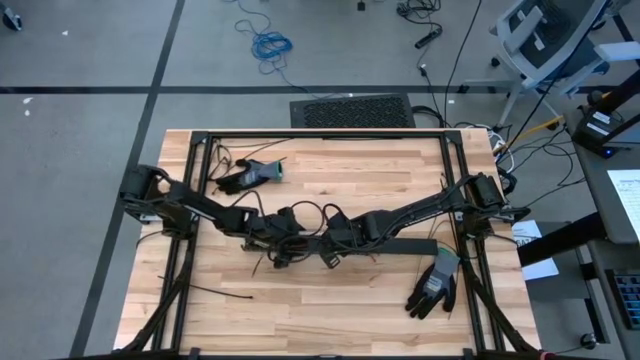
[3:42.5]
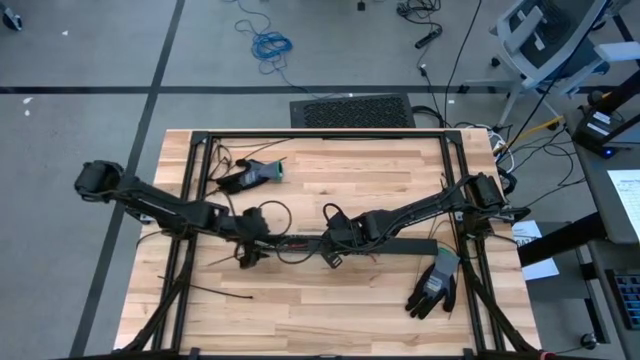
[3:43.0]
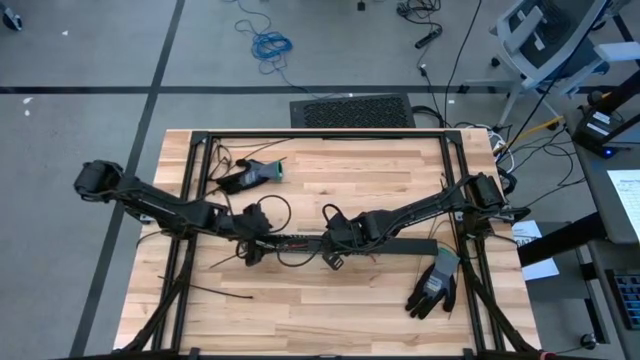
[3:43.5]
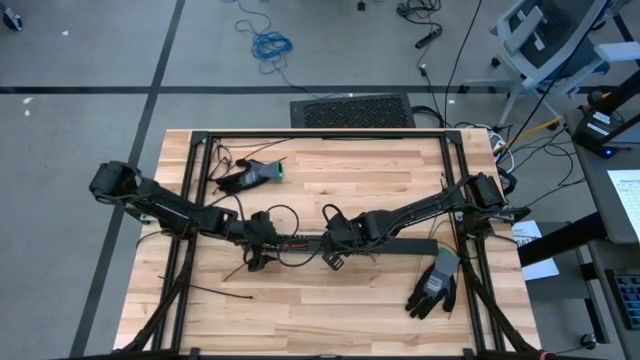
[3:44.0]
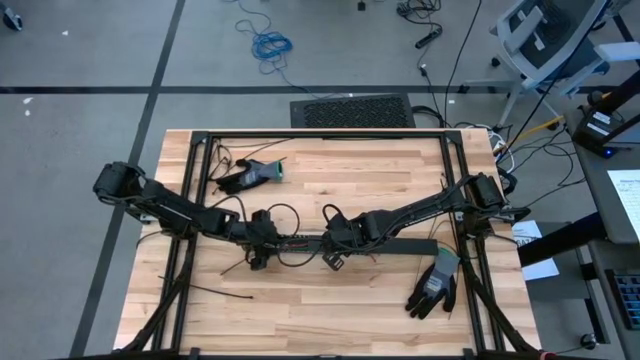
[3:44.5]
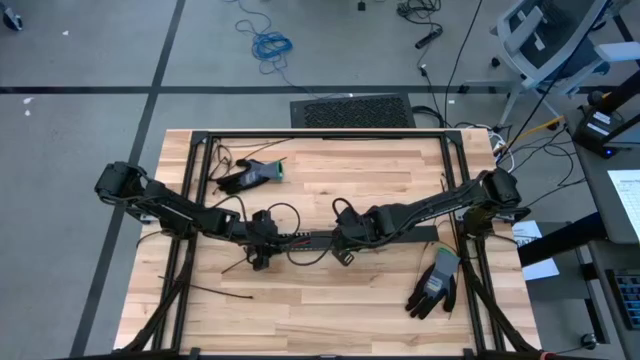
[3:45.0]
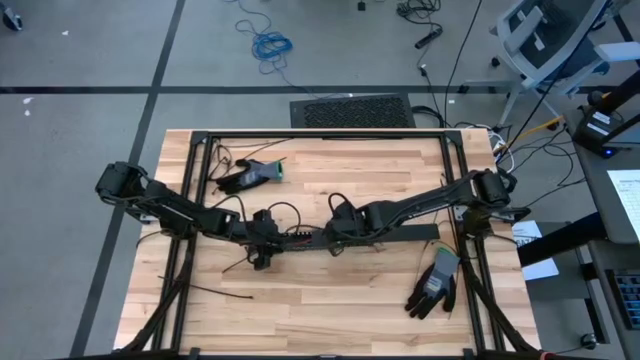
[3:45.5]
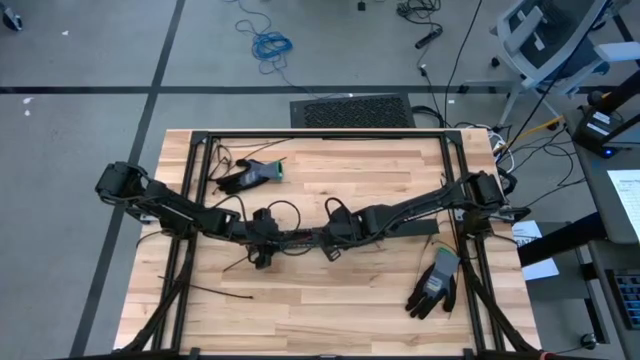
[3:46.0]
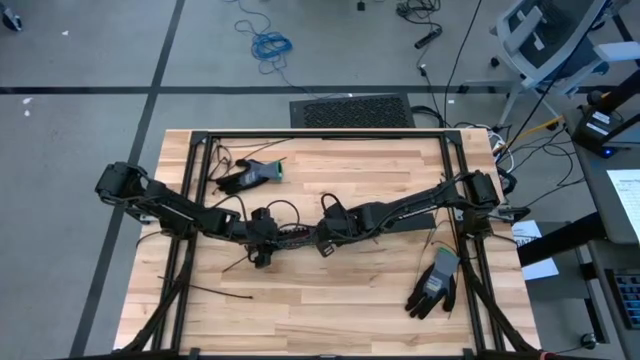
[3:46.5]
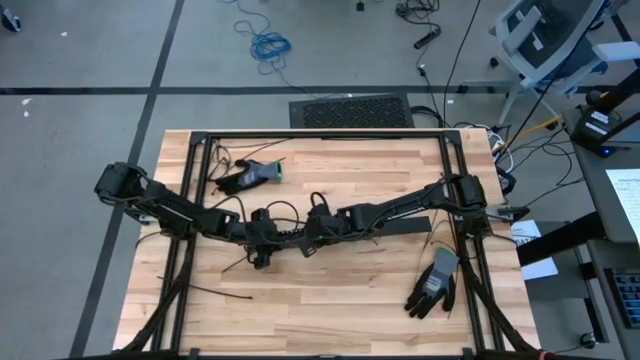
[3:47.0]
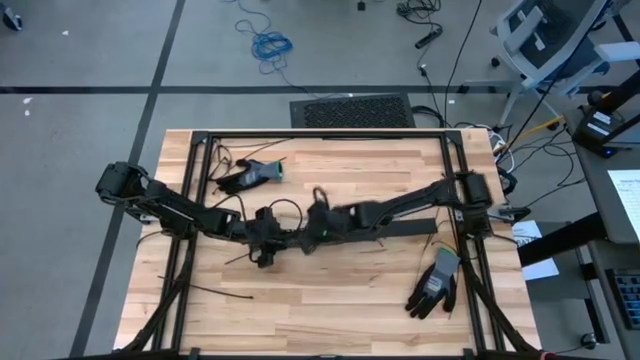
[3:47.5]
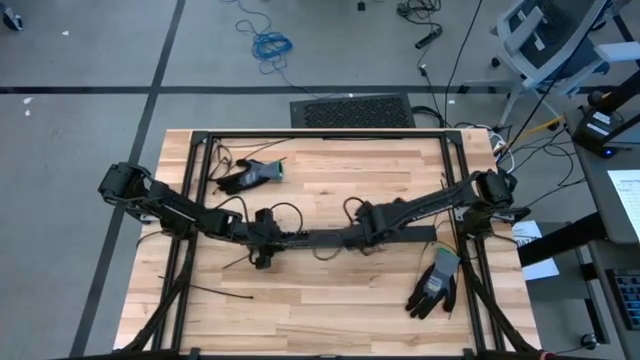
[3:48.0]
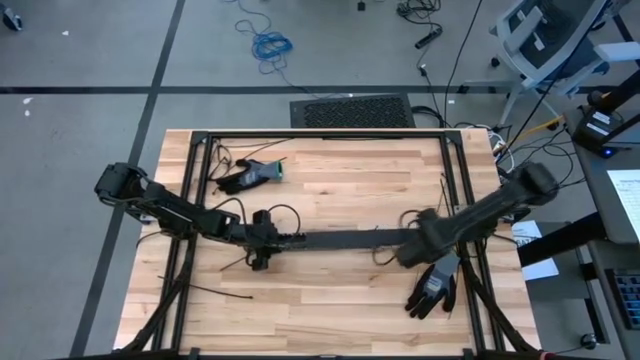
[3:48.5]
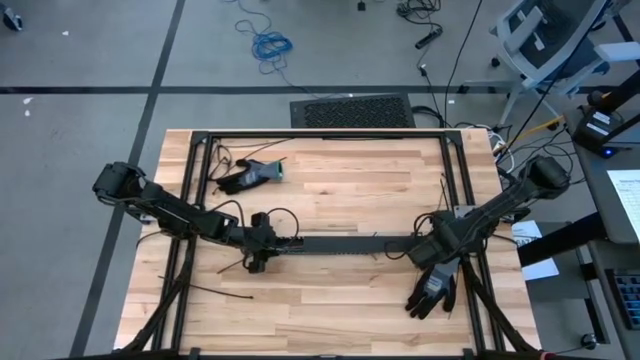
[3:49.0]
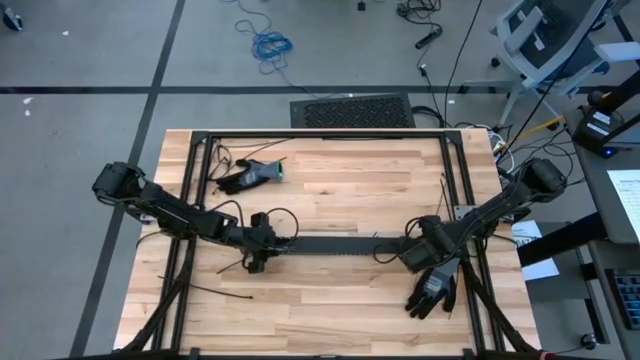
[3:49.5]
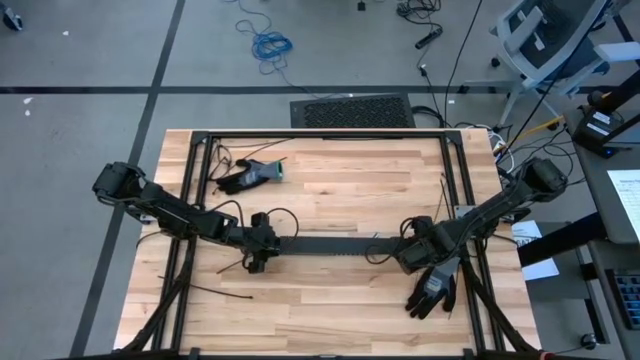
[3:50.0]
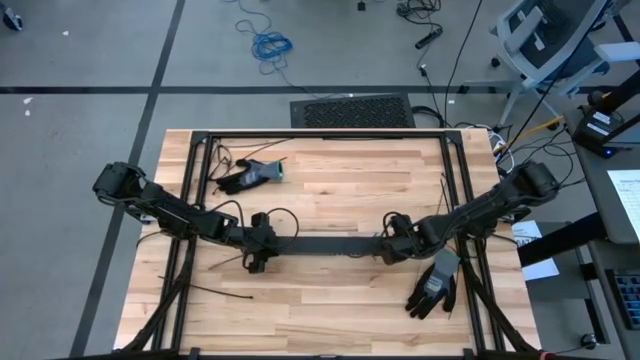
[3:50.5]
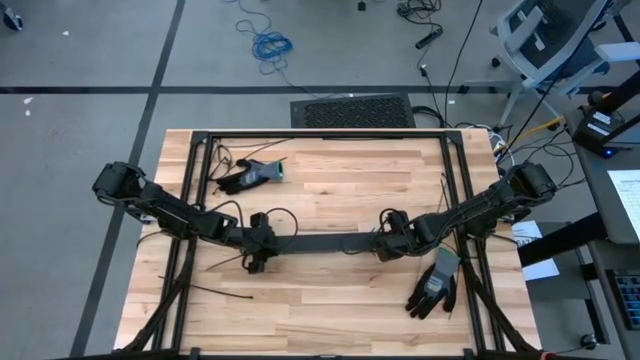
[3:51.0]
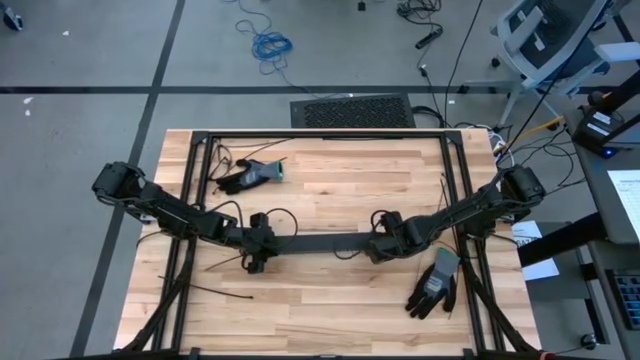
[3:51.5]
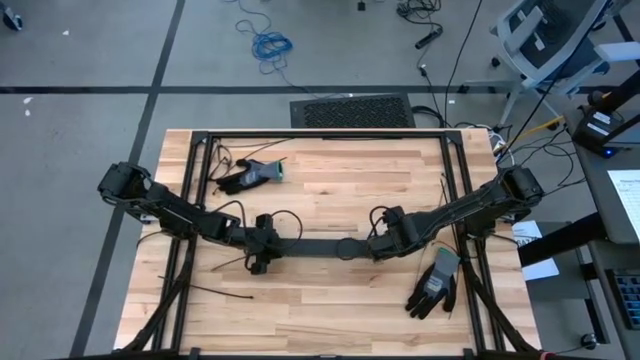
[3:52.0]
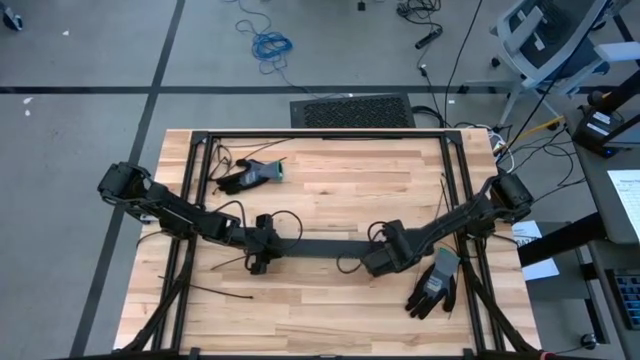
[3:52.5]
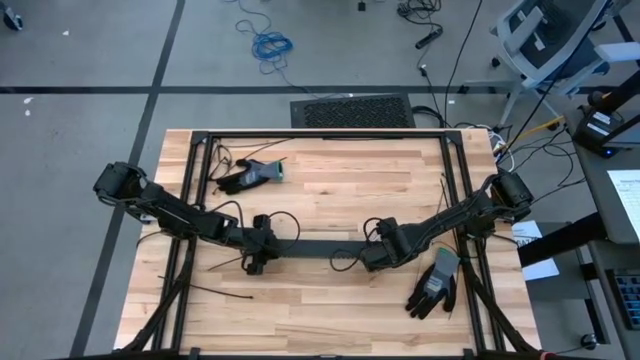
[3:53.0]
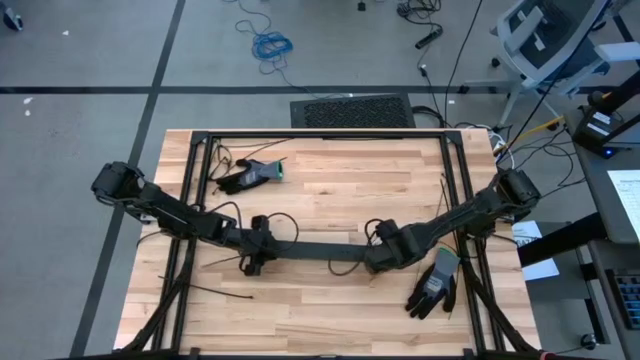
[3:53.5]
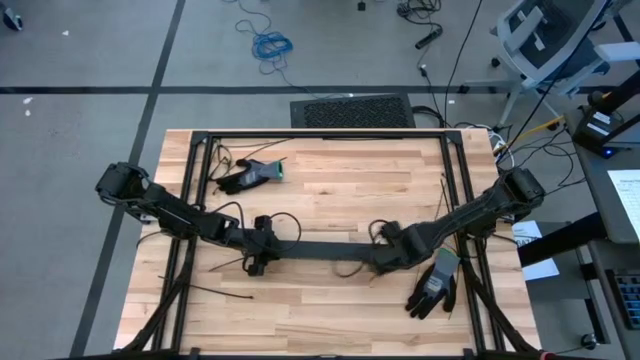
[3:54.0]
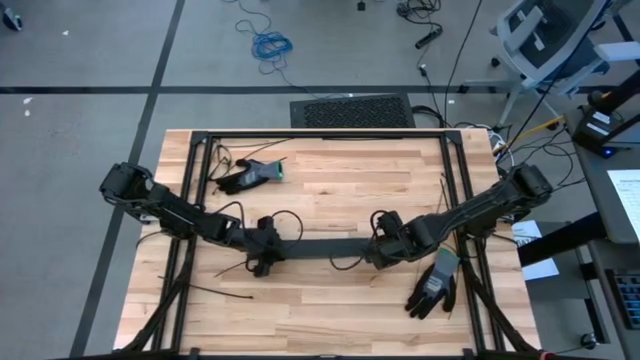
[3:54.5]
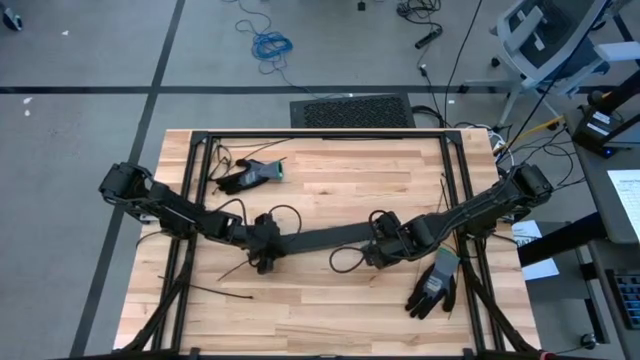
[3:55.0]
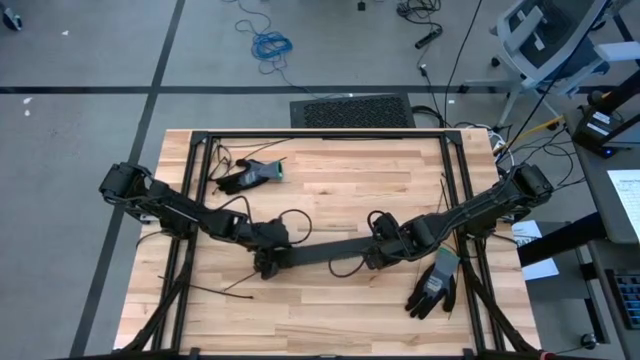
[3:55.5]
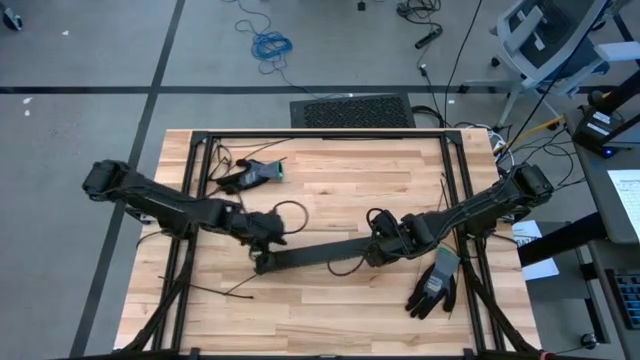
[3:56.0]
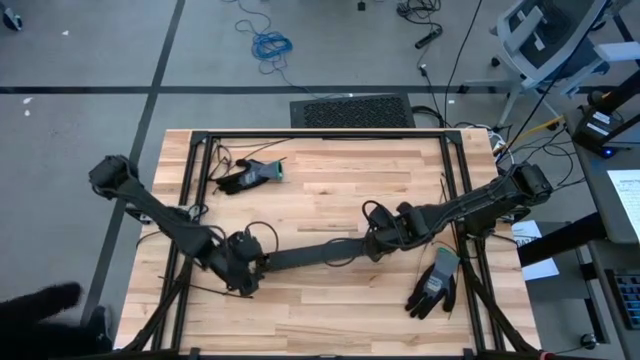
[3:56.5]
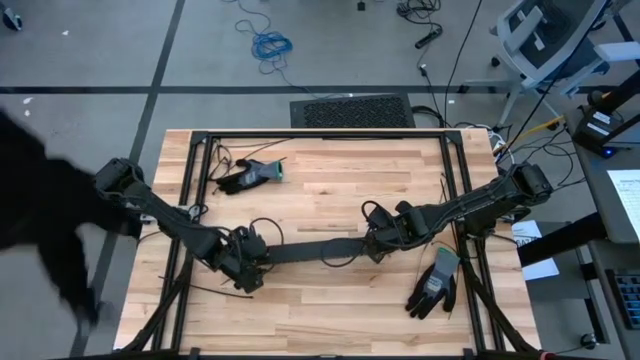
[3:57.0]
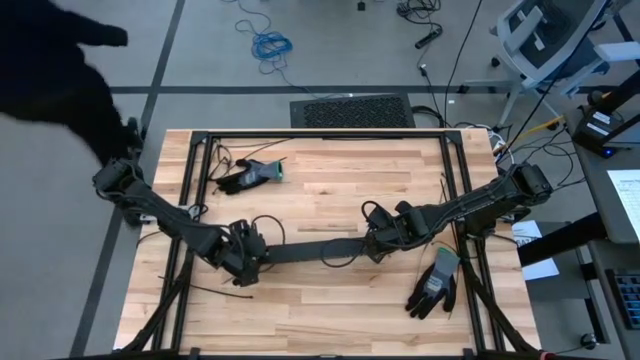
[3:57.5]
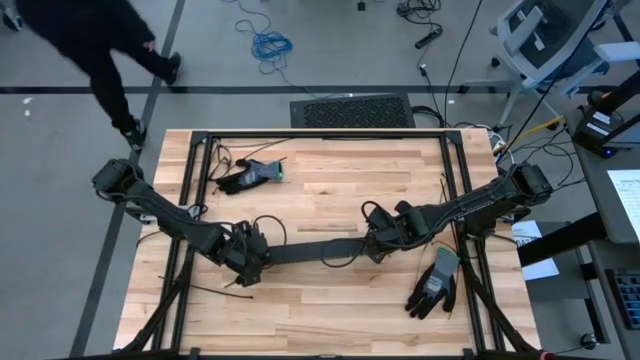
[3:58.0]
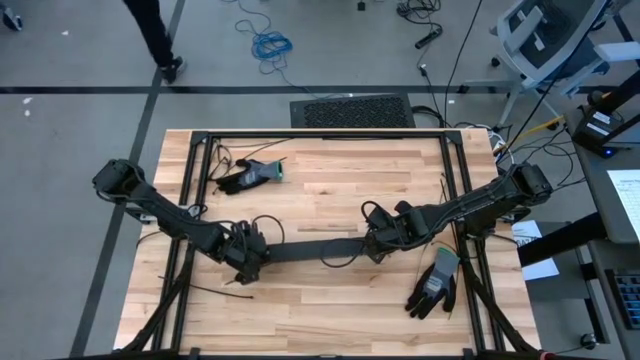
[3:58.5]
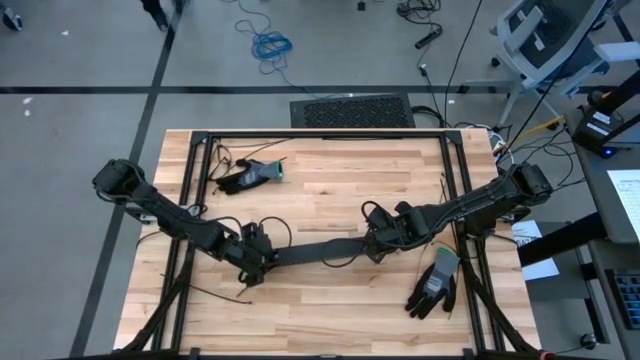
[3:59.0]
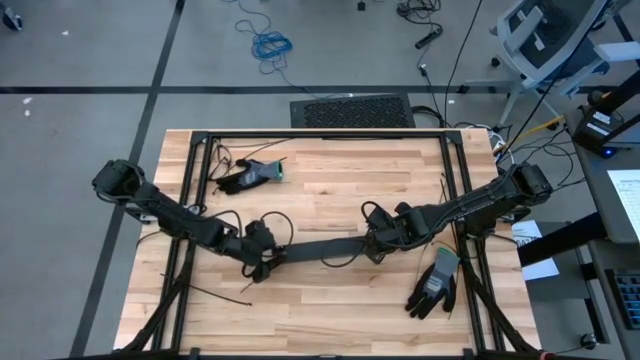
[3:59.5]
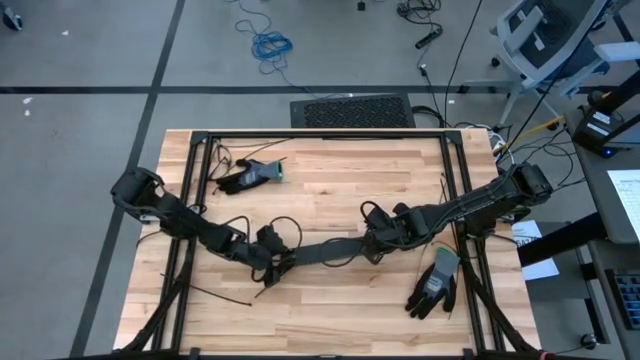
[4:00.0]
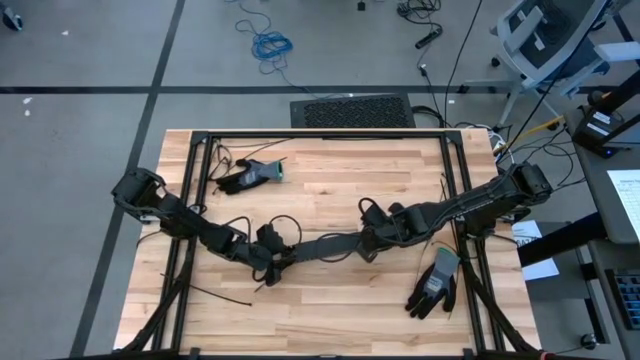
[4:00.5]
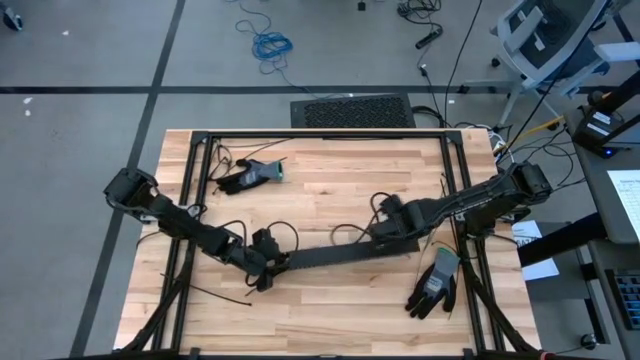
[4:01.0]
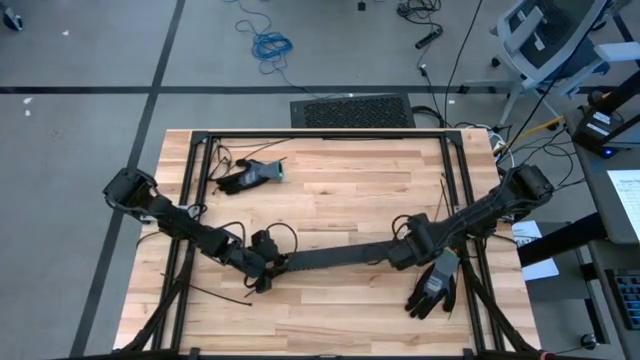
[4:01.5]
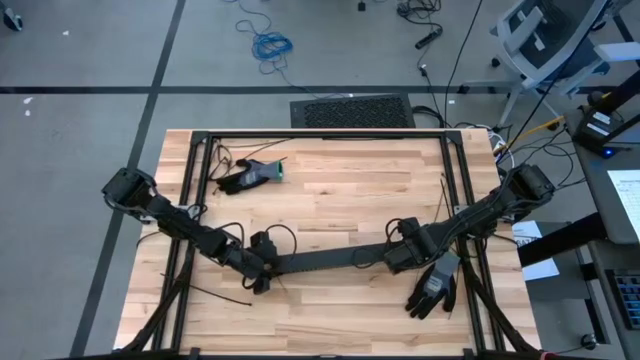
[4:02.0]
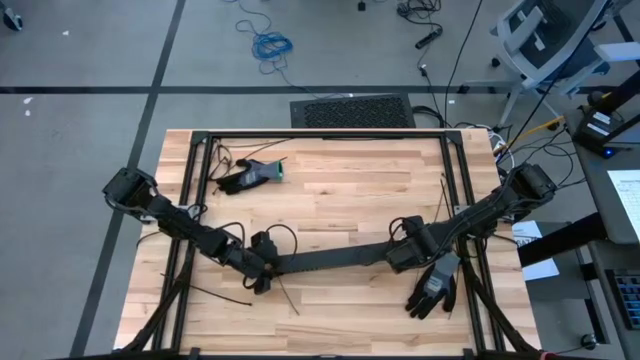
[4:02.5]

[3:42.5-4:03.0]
Task: Ziptie cables
Close the black cable duct

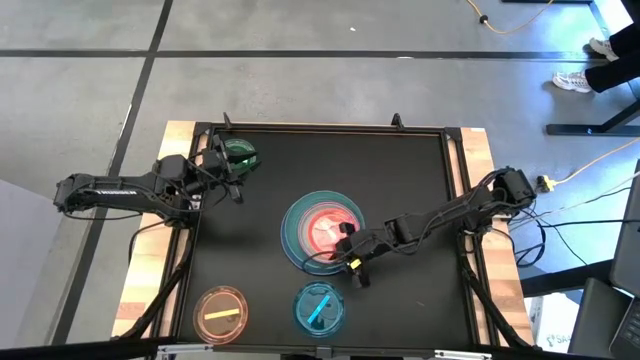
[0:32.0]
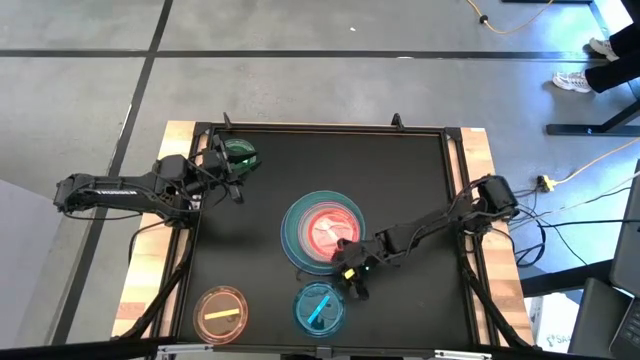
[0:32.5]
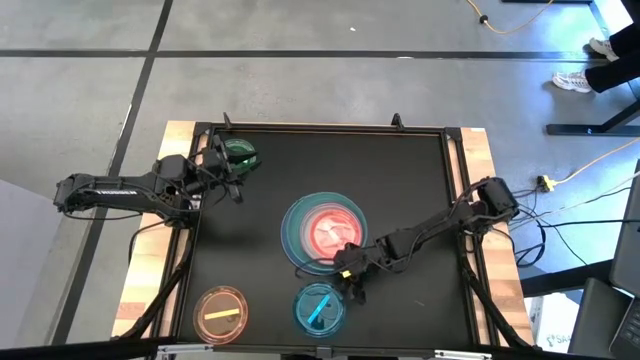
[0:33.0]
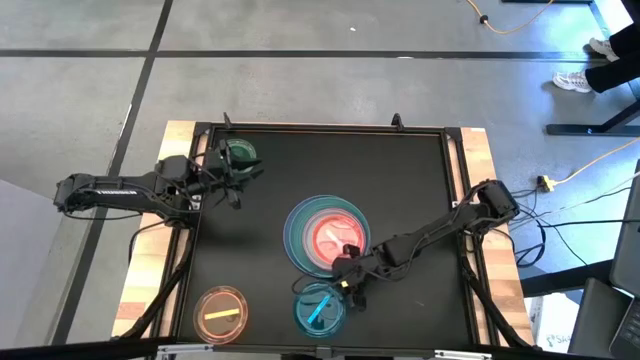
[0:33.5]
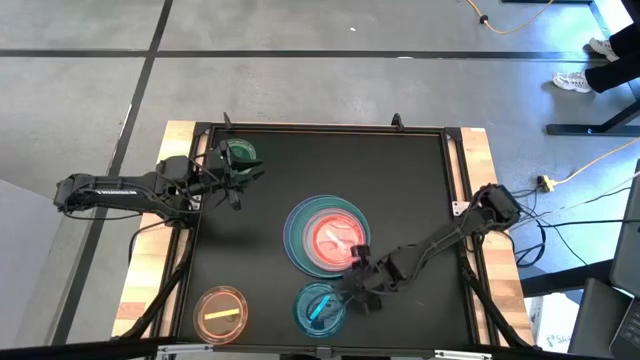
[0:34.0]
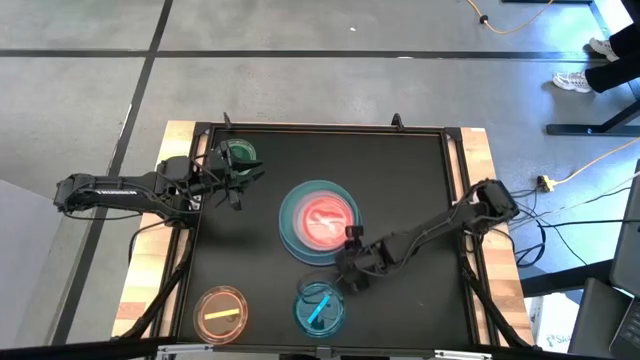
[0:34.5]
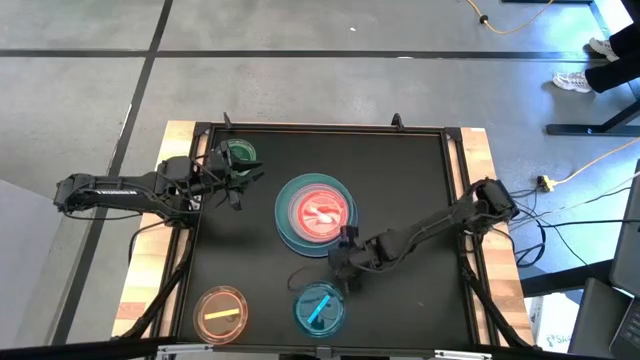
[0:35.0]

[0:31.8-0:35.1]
Task: Stack plastic plates
Adjust the stacked plates
